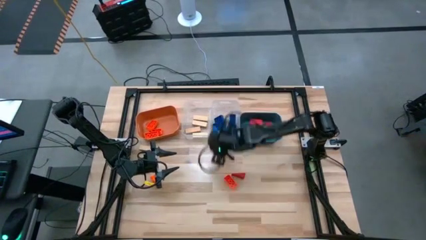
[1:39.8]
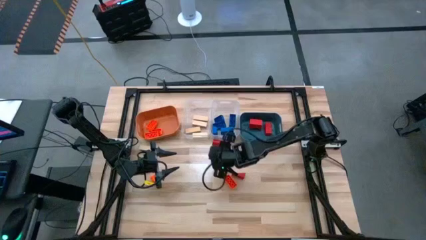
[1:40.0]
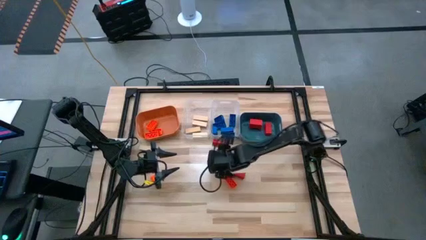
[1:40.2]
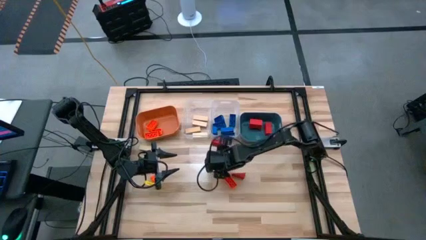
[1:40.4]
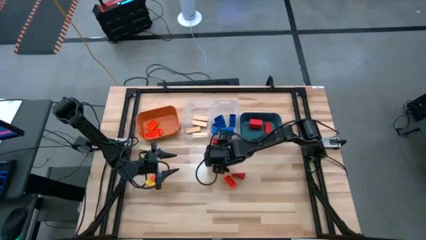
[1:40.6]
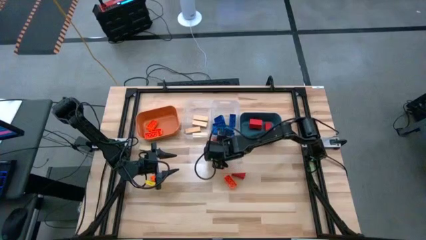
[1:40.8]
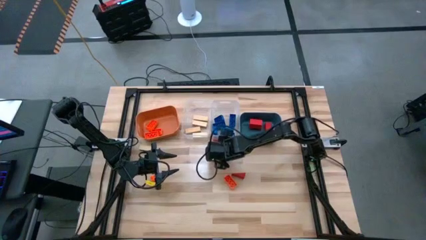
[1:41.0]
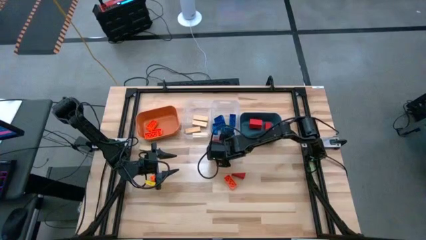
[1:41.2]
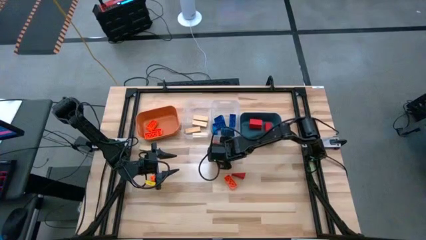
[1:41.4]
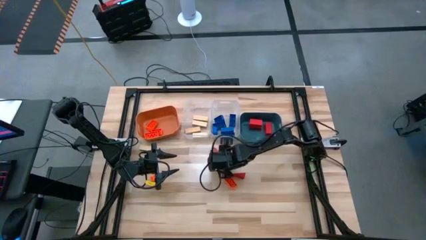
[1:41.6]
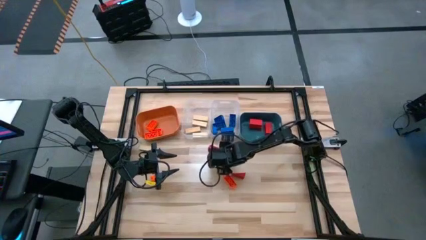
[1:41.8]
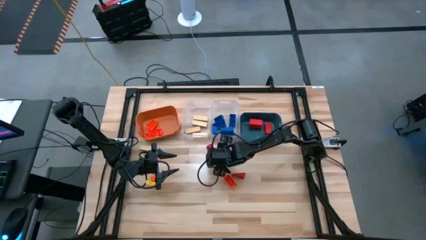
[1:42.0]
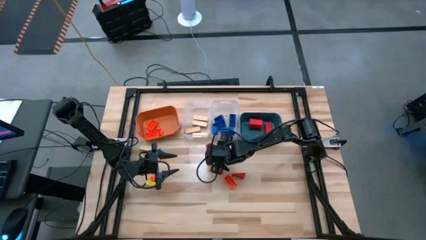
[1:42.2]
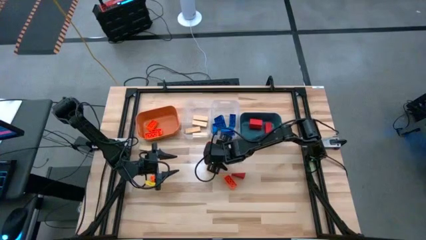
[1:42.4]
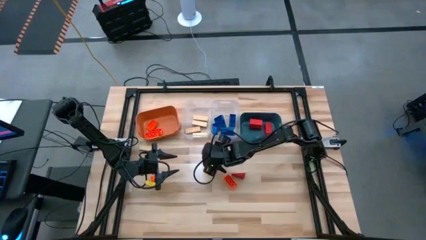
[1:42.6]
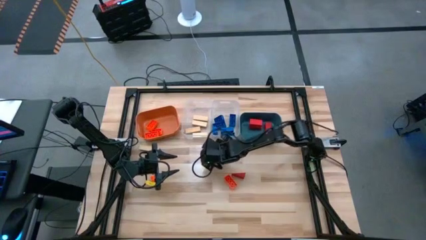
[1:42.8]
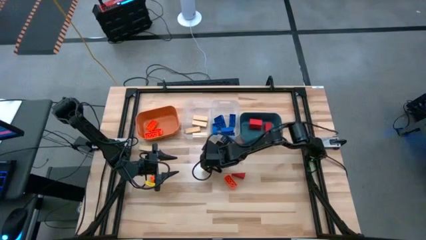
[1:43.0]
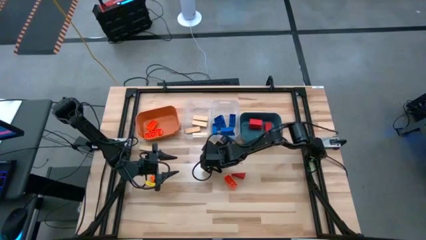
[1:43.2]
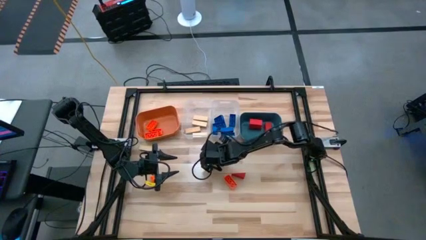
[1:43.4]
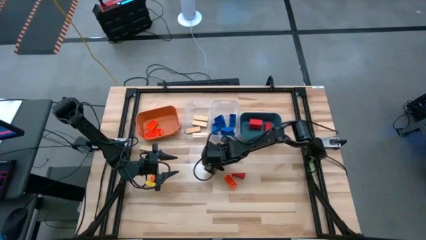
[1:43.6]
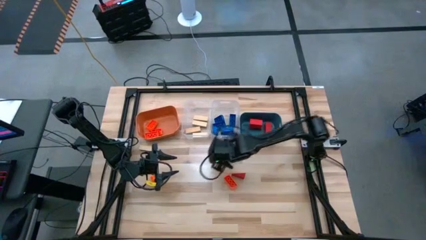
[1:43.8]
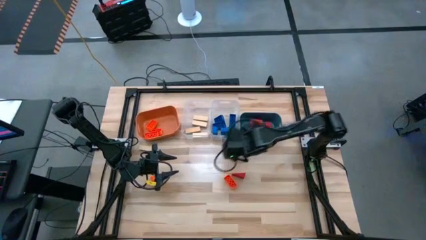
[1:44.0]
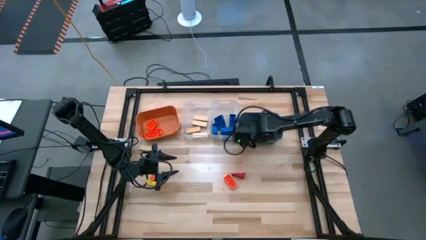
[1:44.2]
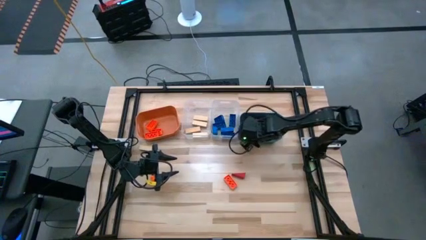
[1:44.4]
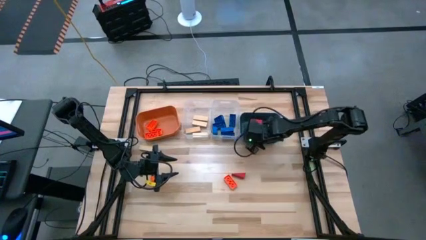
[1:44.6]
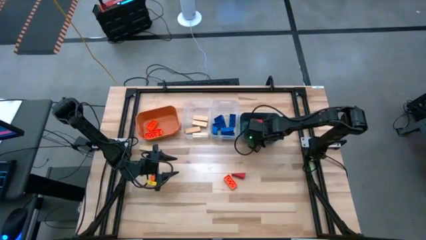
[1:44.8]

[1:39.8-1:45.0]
Task: Sort blocks
Put the red block into the blue bin

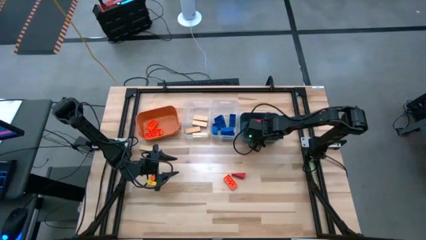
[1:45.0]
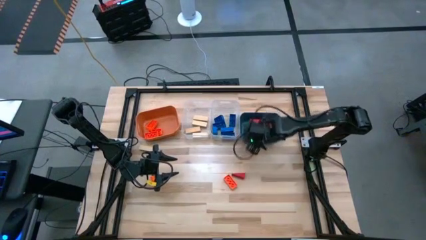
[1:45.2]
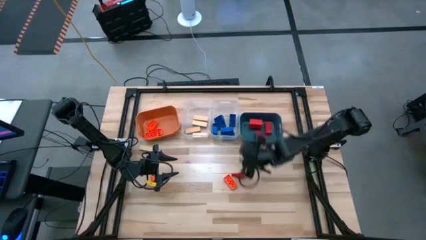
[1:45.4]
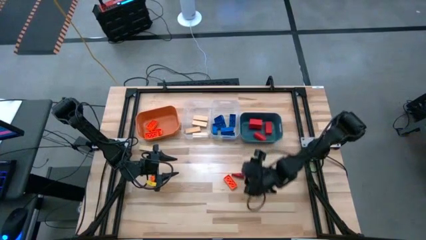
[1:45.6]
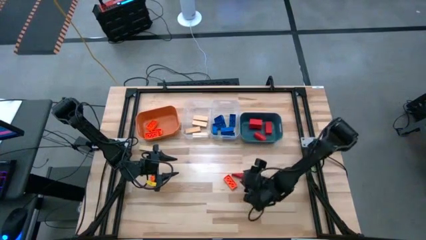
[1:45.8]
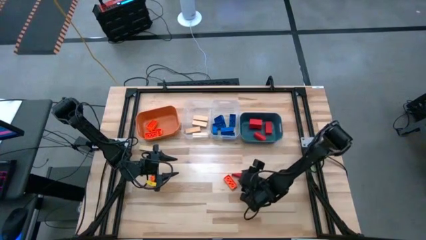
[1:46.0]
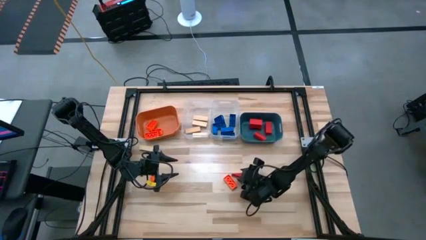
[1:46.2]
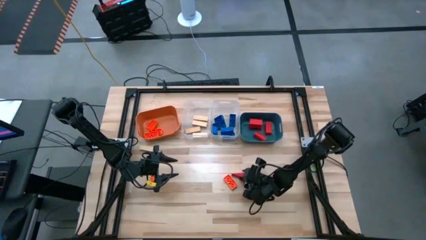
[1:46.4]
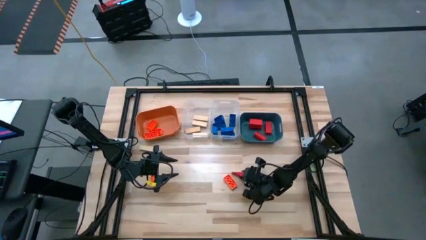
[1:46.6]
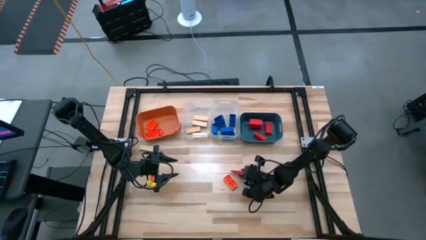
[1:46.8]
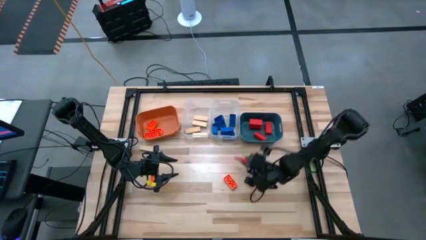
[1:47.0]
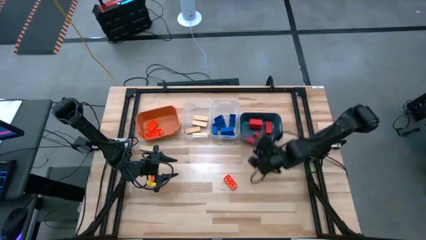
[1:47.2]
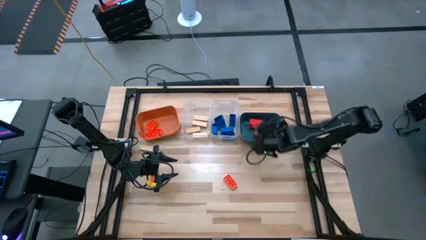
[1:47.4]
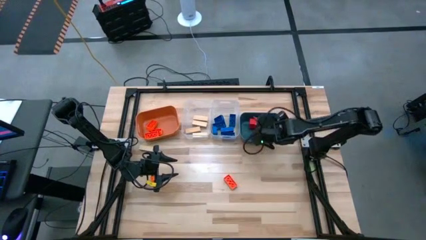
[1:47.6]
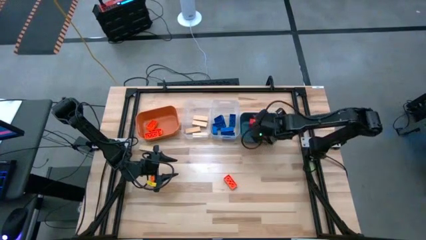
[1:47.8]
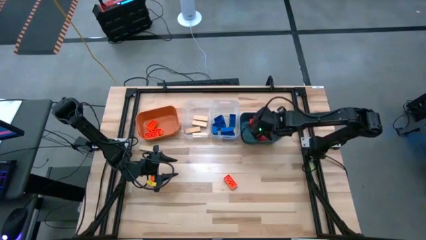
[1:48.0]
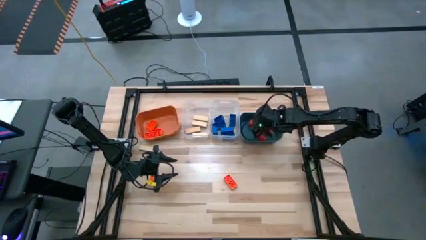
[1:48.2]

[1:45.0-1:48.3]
Put the red block into the blue bin

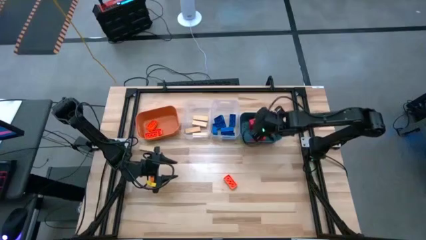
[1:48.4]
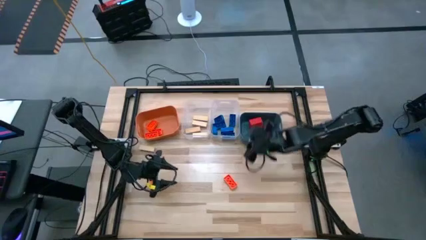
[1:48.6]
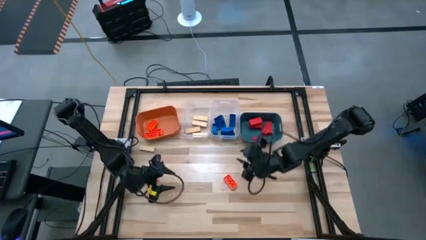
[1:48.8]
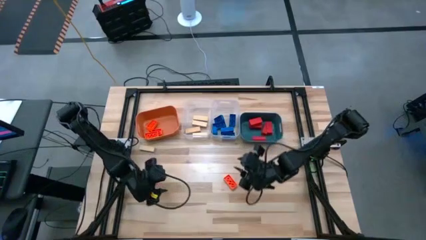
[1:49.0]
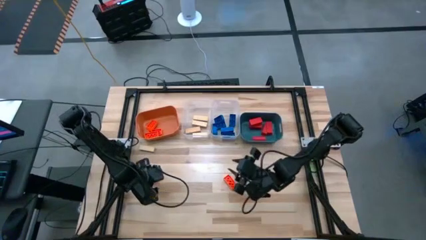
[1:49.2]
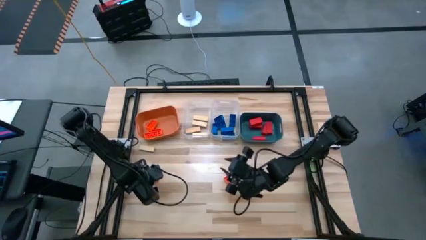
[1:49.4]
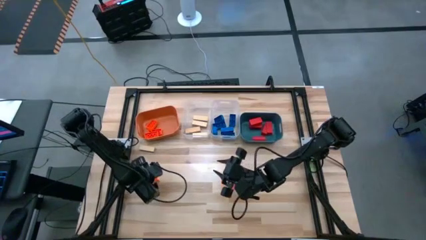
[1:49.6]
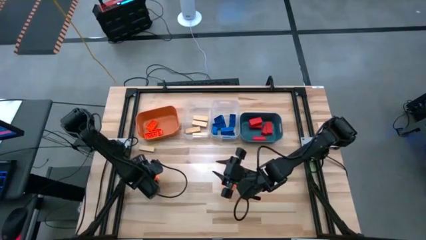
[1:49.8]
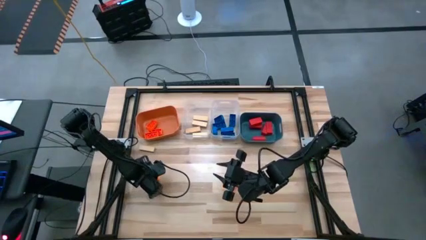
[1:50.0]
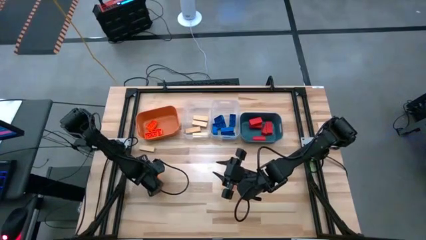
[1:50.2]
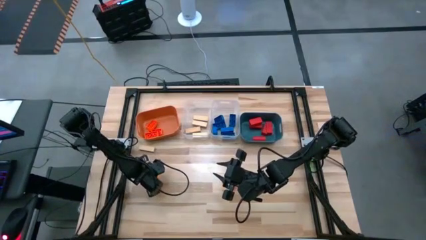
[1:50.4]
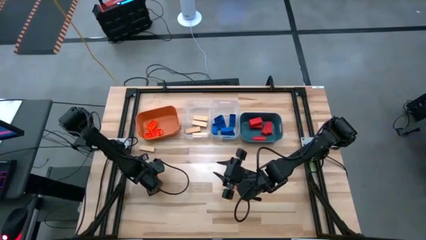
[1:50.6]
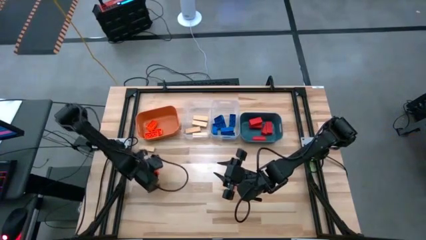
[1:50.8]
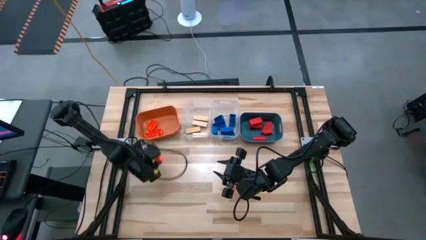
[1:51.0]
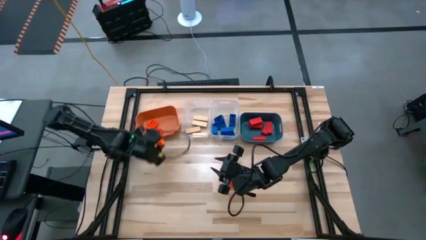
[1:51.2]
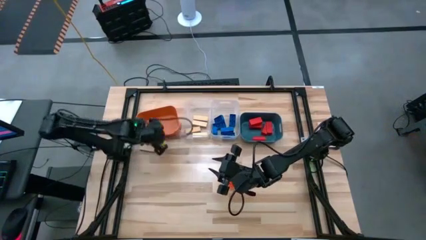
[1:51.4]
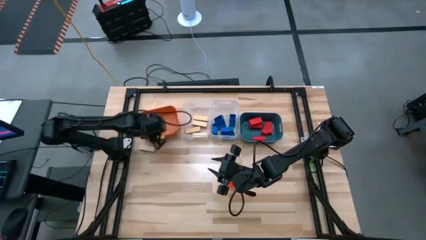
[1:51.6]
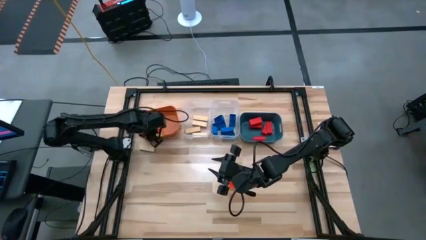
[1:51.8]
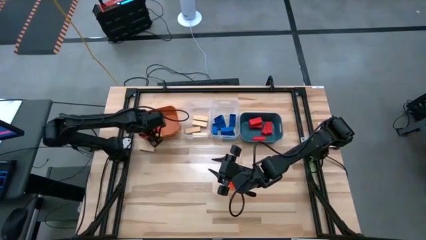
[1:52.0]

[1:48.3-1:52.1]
Put the orange game piece into the orange bin

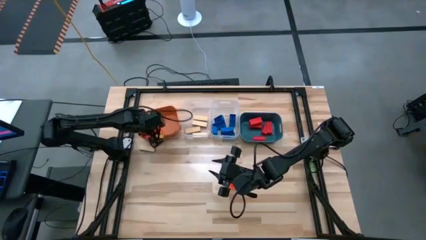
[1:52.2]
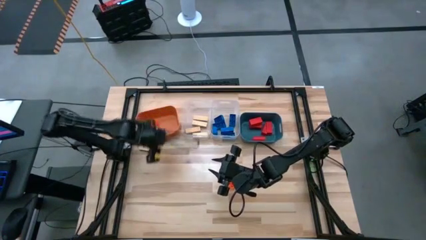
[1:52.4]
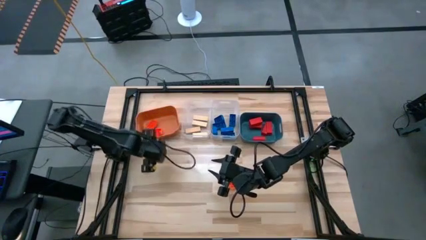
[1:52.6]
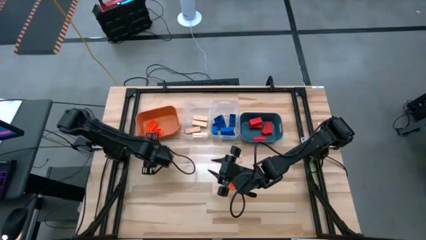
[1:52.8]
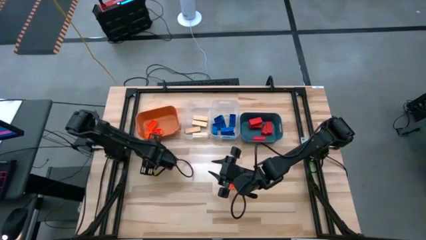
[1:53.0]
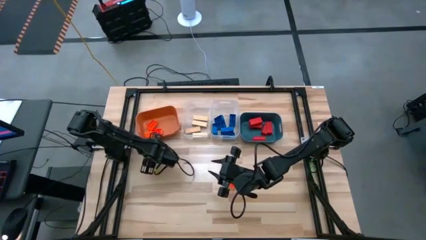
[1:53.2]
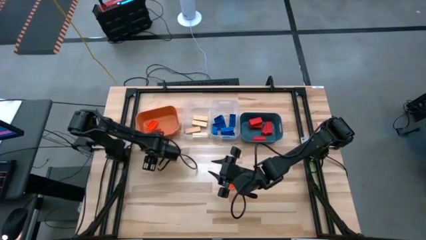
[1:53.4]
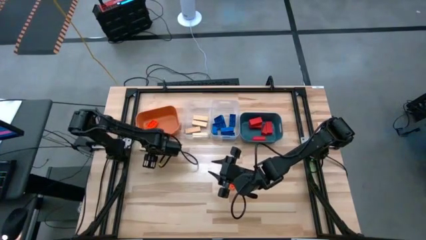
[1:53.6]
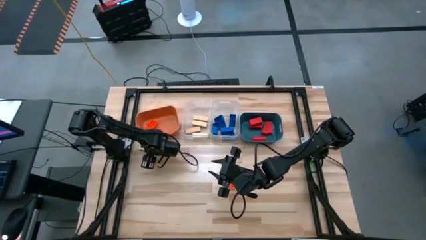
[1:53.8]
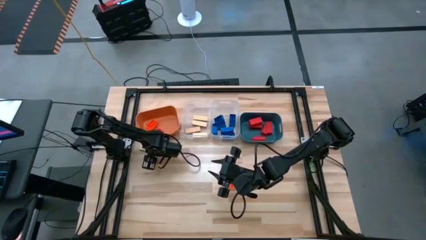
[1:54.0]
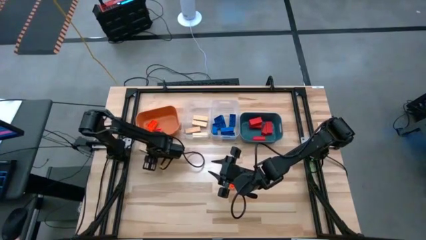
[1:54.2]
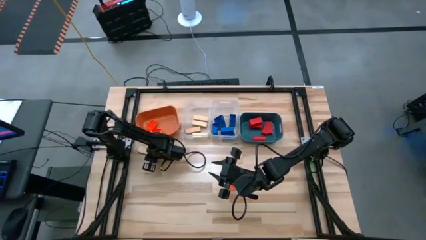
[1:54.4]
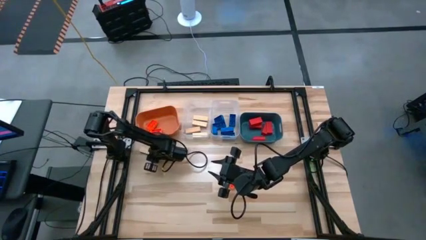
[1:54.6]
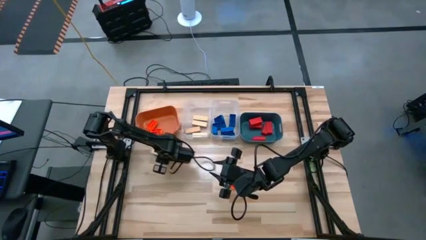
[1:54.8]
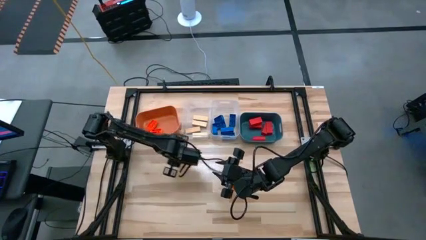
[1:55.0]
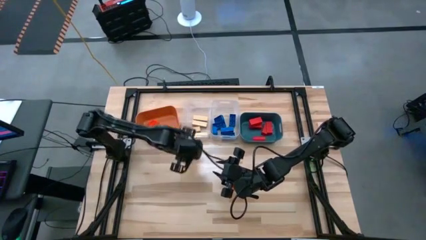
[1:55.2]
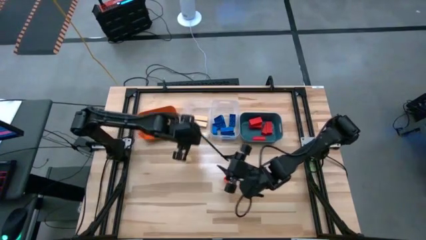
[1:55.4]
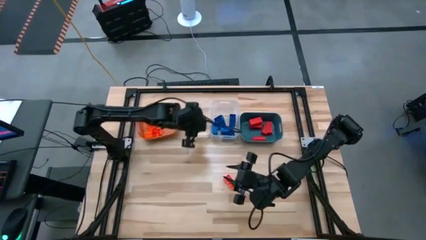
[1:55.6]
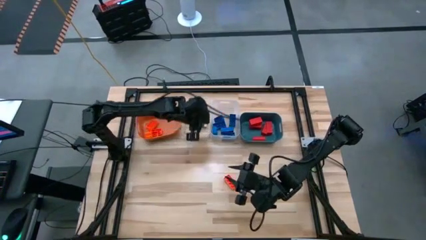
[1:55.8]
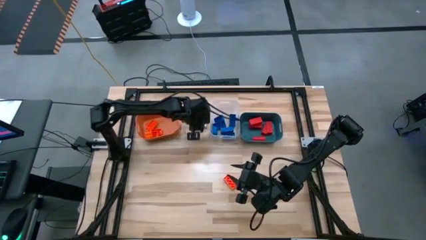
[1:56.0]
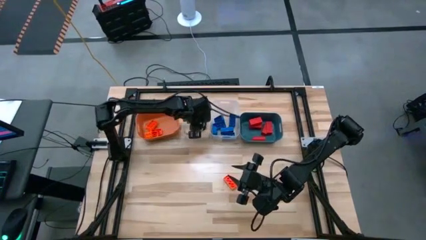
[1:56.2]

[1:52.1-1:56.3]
Put the brown block into the left transparent bin
